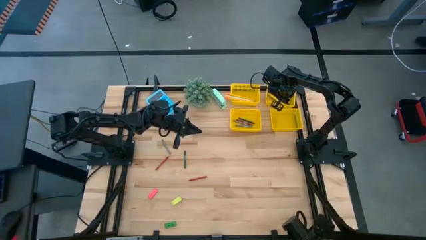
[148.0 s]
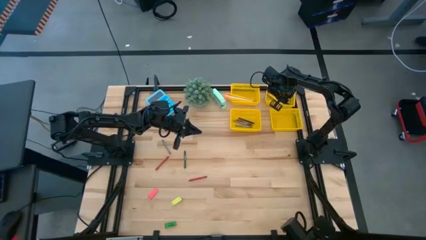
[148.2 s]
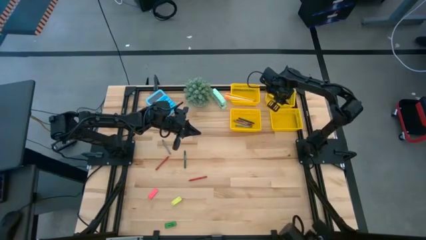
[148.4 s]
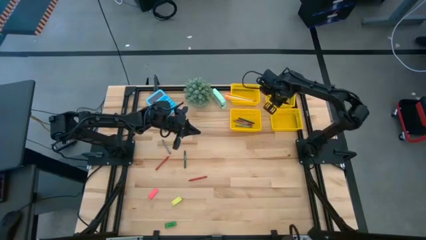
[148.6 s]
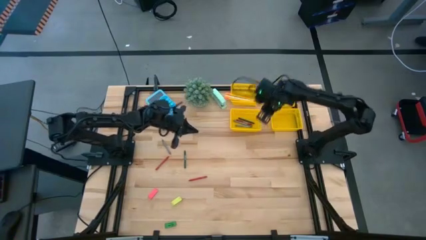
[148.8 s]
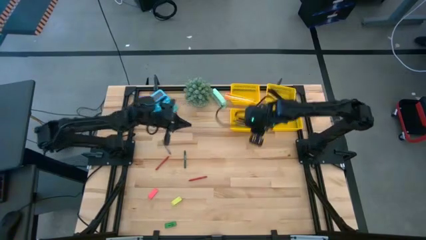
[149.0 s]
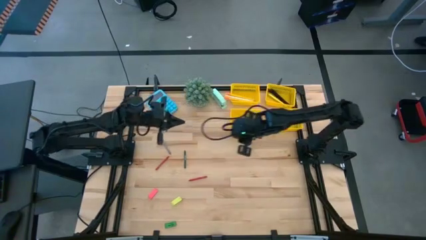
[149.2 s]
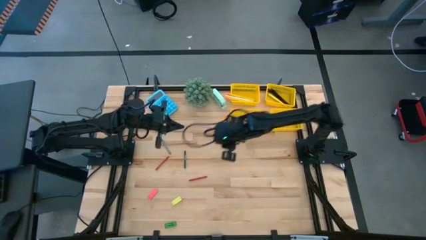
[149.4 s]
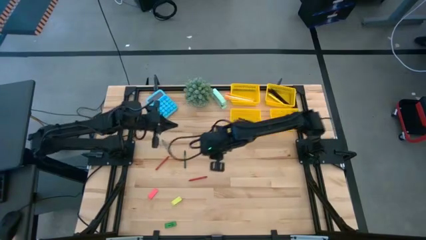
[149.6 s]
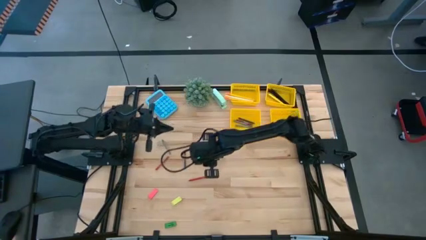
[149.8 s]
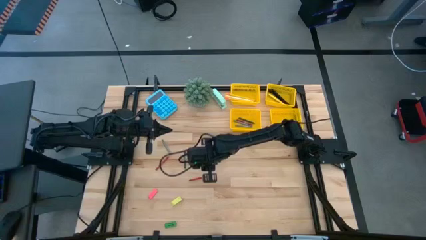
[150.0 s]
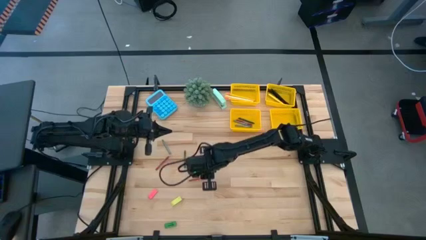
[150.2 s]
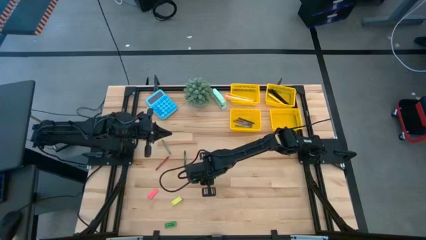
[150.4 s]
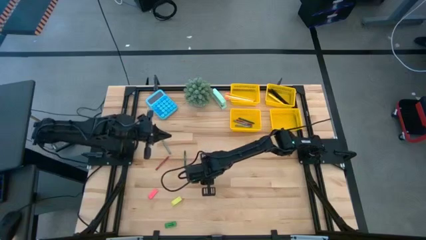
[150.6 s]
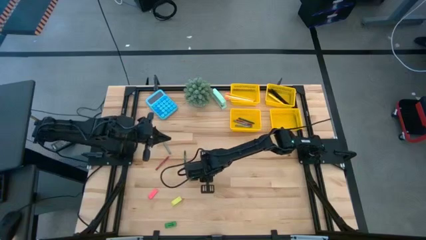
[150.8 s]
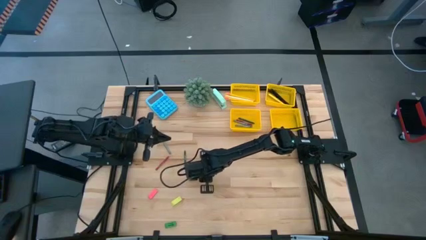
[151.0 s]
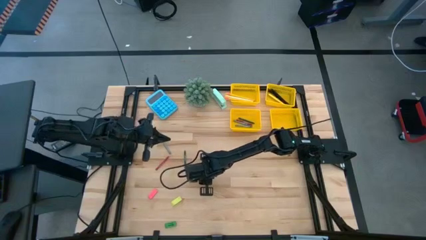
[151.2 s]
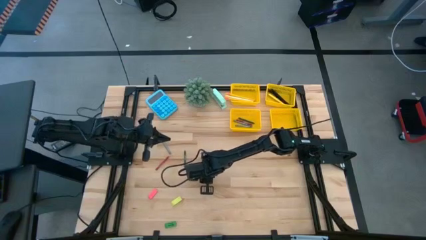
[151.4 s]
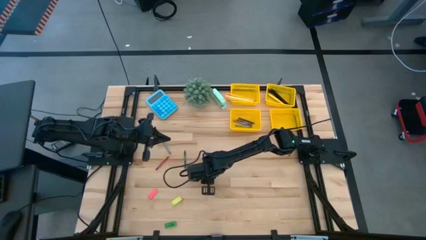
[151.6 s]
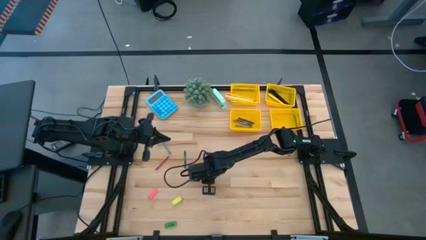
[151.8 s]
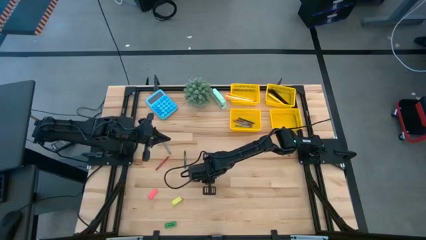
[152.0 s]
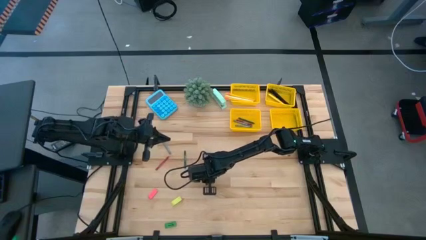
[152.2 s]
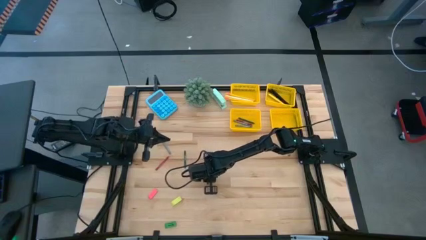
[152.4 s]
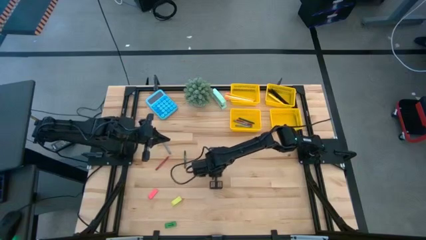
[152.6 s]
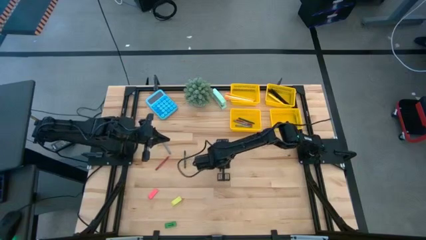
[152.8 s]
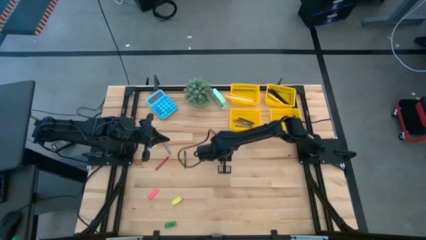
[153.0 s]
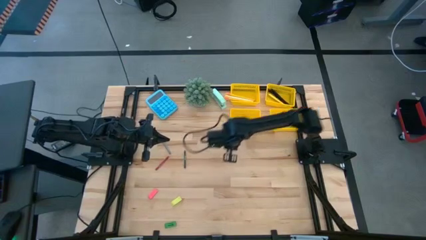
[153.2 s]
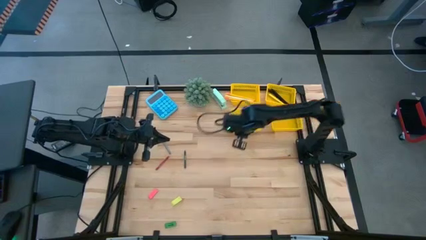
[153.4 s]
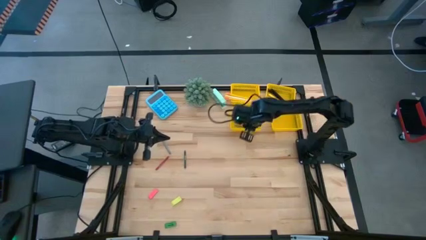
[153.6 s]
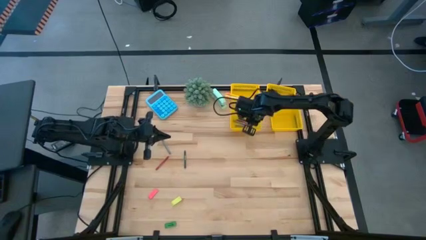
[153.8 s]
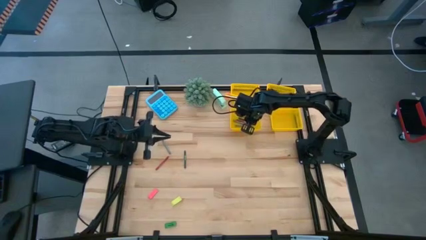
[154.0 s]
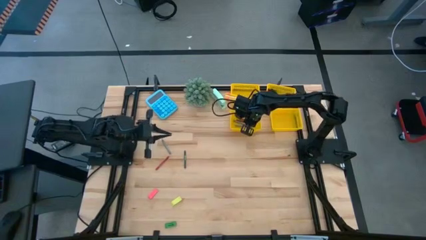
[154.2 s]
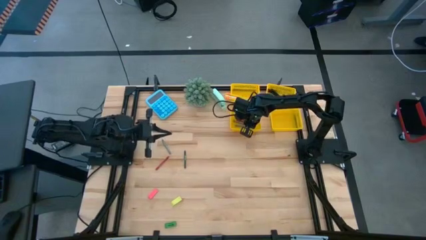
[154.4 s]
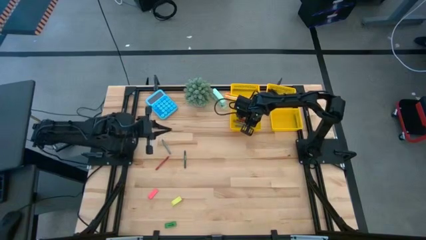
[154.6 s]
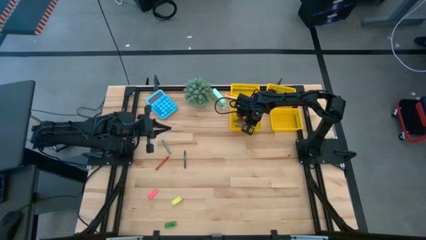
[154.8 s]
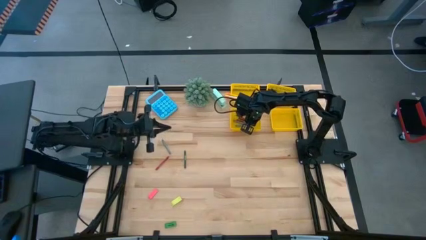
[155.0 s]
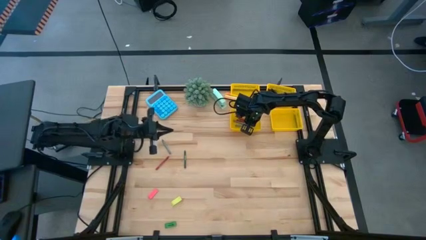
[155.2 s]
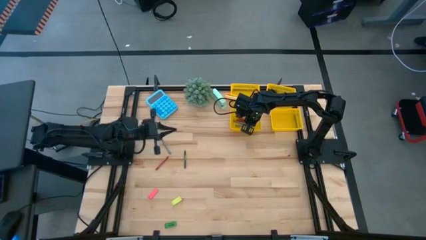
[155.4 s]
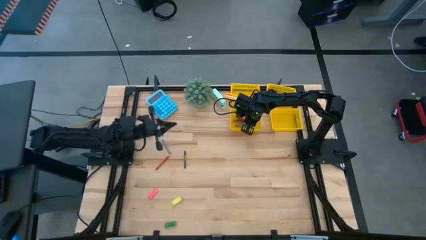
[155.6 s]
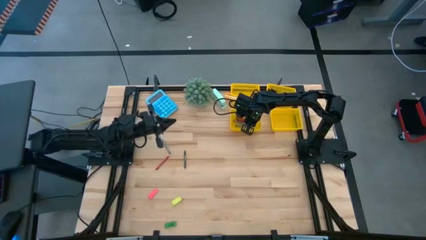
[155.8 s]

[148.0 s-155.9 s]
Task: Sort crayons/erasers/pens/pencils in bins
Put the right red crayon into the bottom left yellow bin

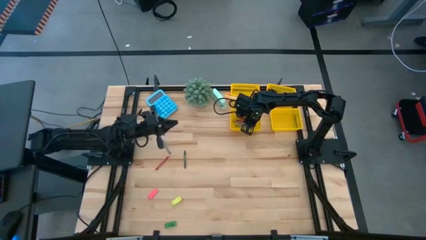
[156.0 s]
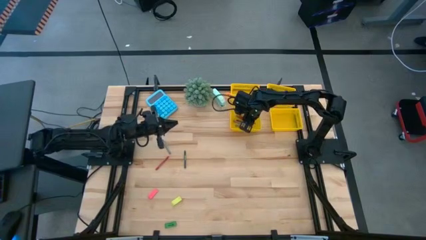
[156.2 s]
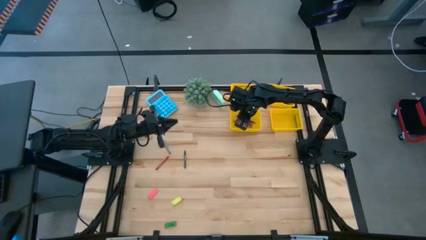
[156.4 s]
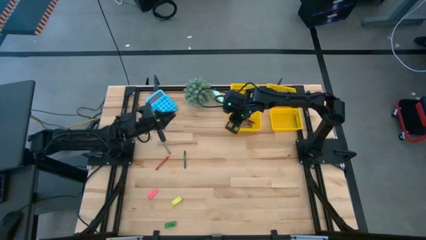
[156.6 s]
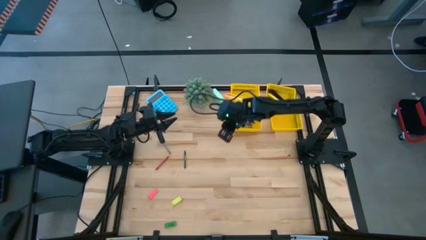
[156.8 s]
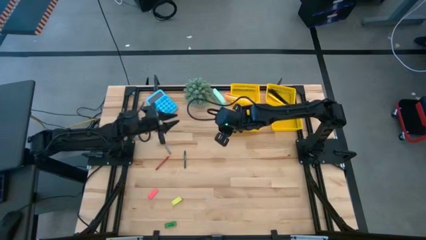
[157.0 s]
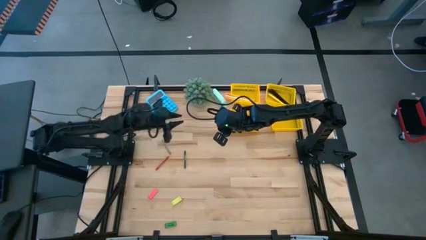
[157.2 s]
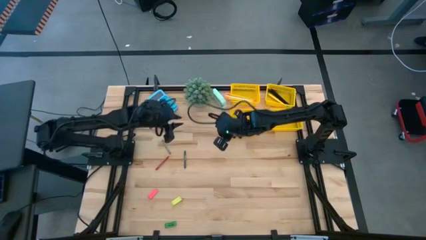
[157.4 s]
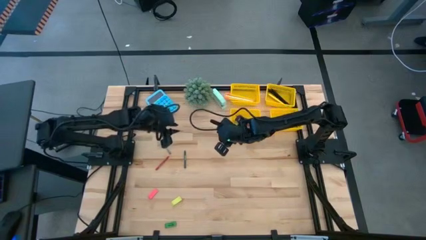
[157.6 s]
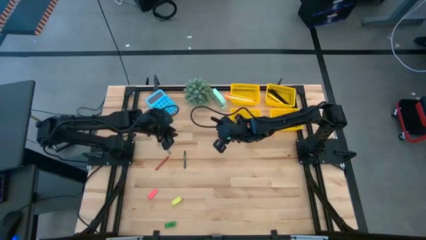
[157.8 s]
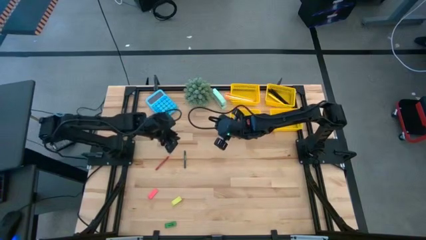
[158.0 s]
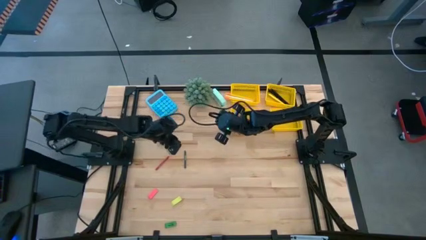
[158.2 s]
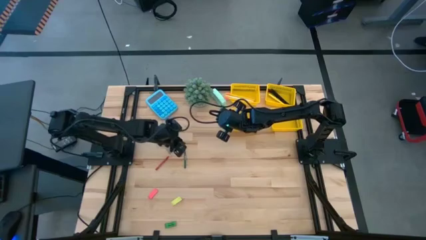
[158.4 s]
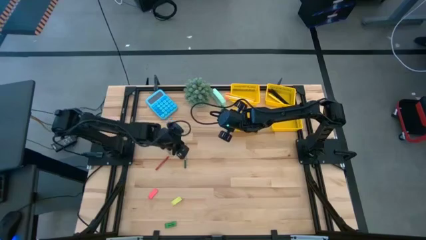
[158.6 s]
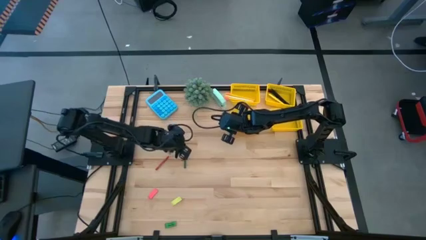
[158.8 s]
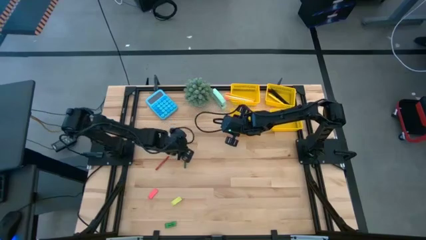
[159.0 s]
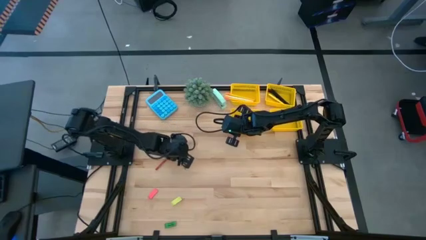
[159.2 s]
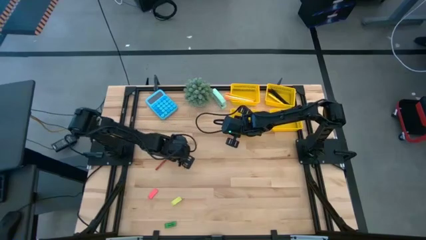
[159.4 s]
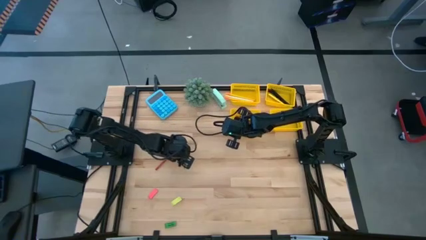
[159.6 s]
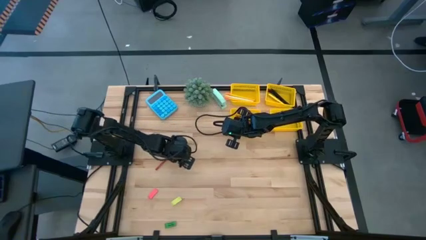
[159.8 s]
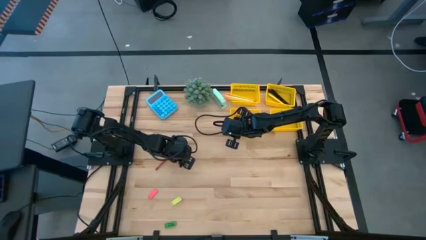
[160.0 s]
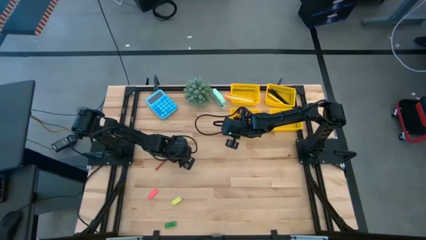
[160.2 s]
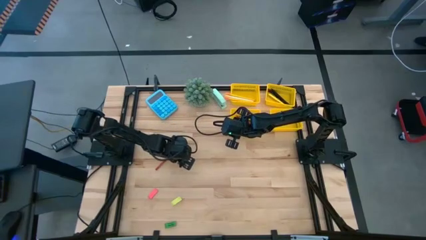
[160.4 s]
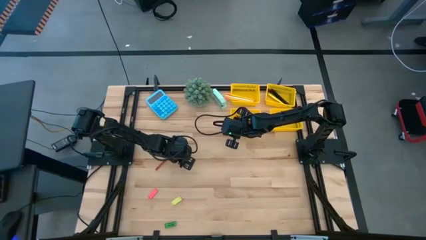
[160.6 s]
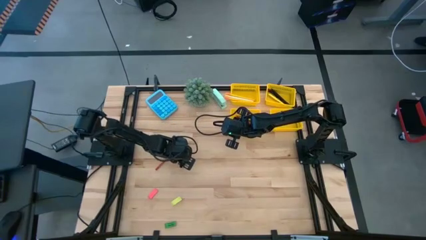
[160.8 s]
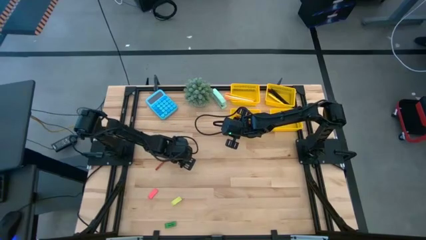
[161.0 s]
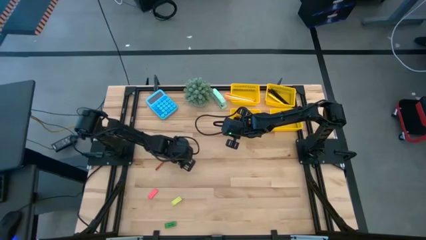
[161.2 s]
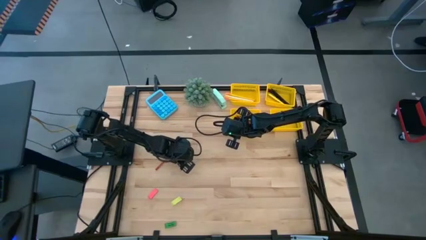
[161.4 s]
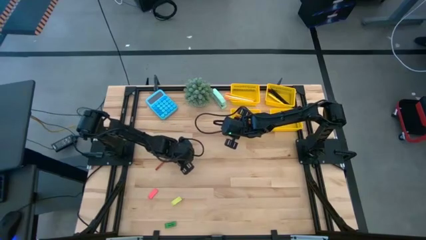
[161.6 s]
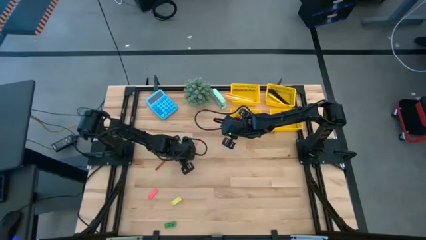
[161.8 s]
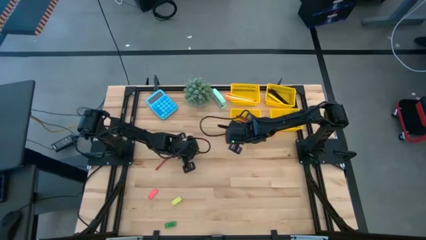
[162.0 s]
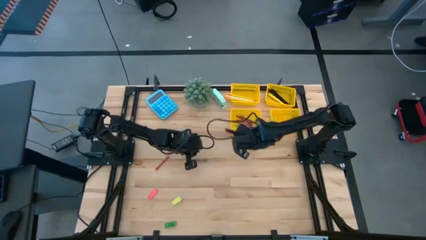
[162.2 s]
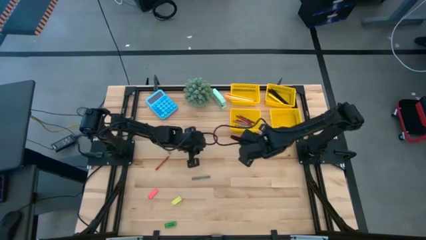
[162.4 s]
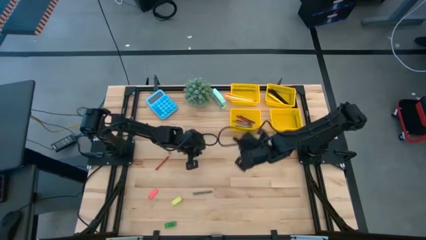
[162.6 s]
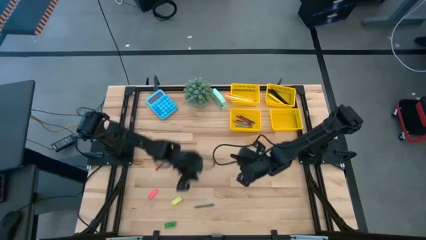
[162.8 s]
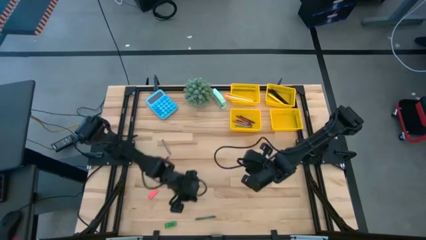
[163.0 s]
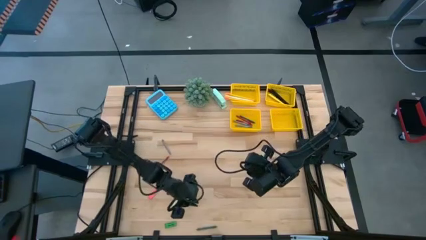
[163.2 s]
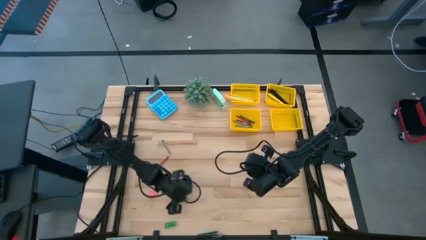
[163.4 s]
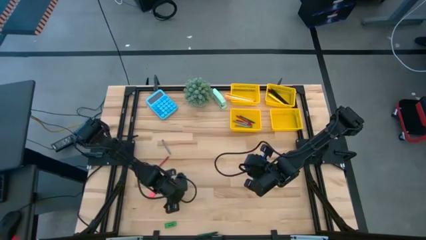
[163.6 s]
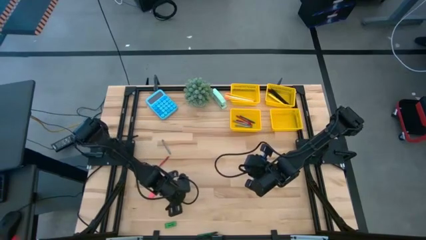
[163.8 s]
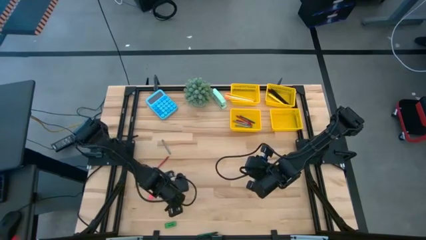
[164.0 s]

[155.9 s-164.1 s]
Put the green crayon into the bottom left yellow bin
